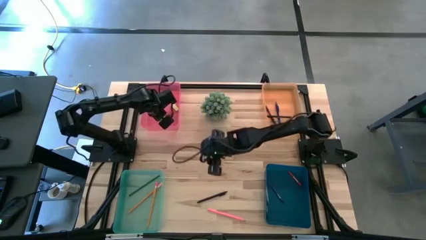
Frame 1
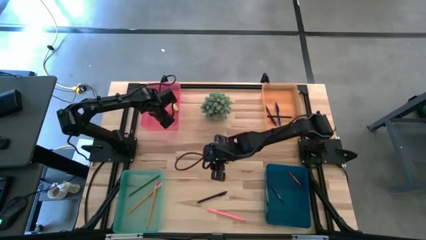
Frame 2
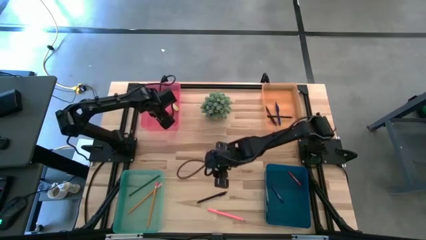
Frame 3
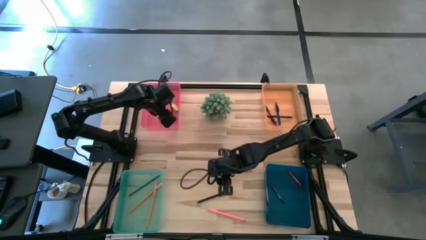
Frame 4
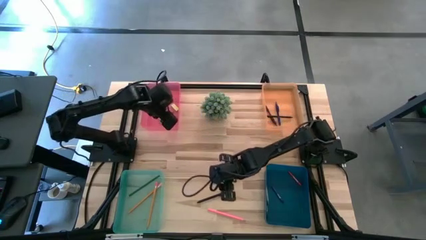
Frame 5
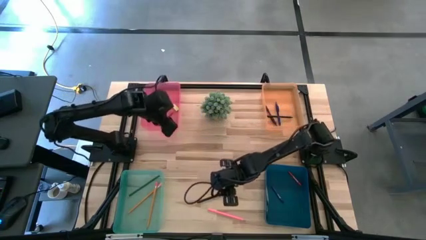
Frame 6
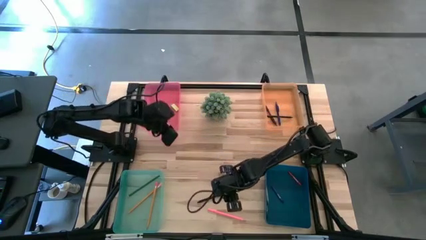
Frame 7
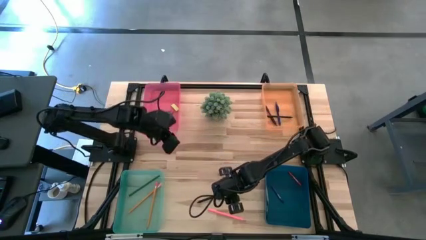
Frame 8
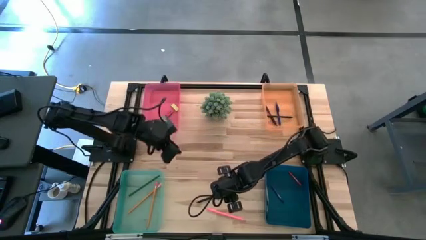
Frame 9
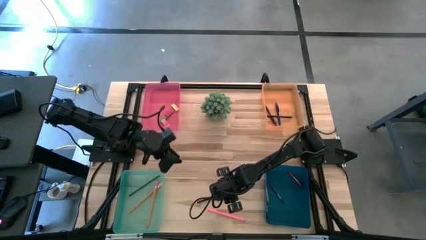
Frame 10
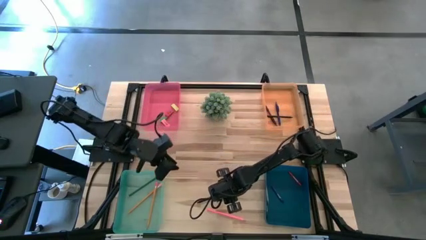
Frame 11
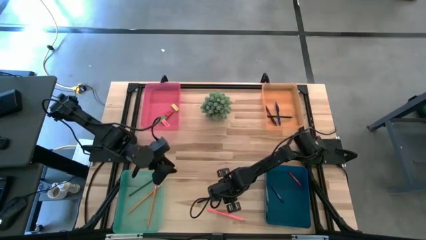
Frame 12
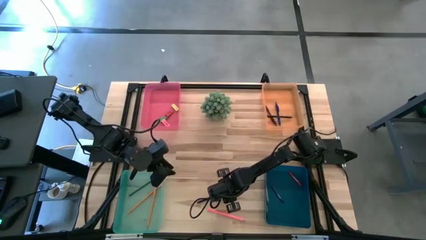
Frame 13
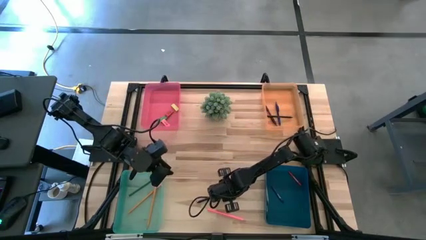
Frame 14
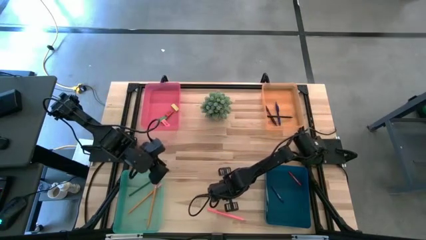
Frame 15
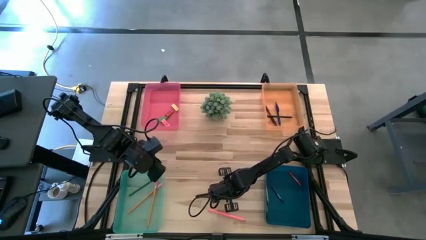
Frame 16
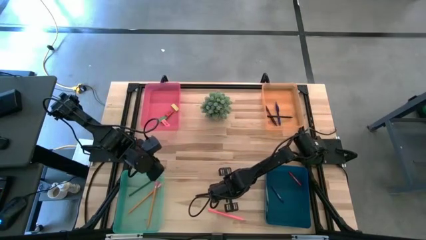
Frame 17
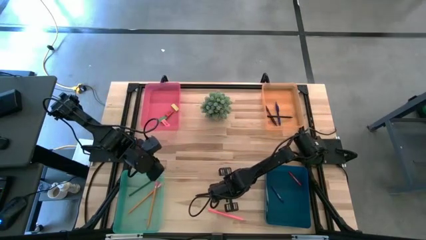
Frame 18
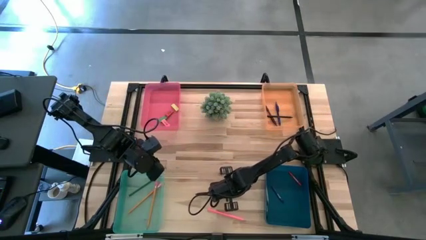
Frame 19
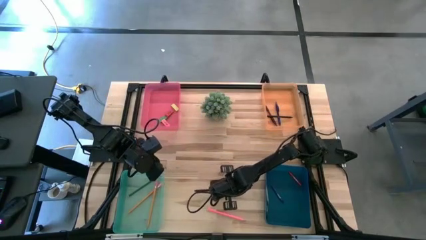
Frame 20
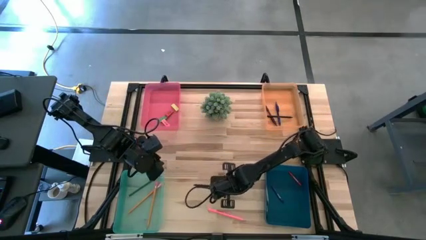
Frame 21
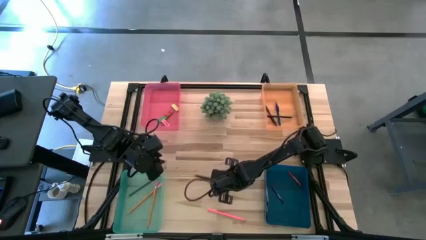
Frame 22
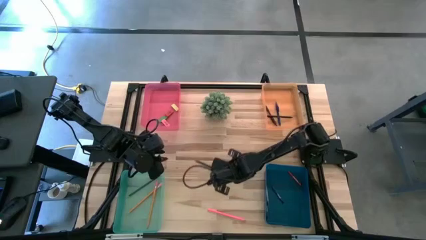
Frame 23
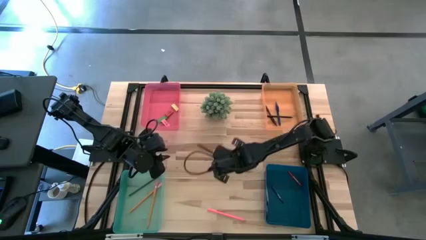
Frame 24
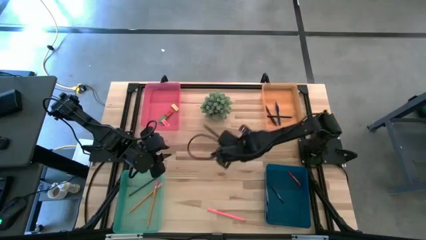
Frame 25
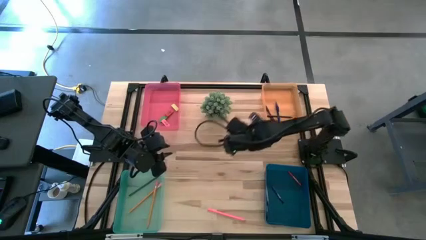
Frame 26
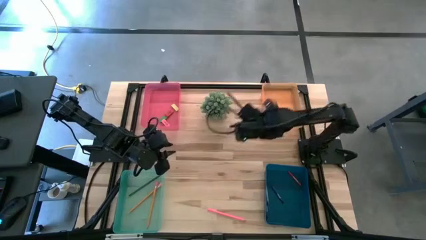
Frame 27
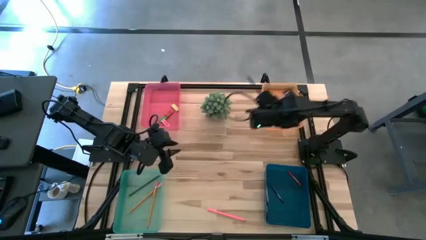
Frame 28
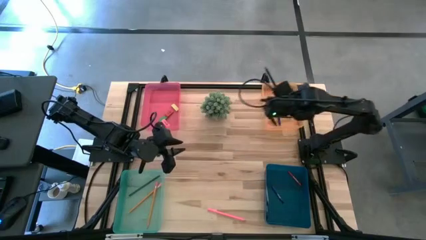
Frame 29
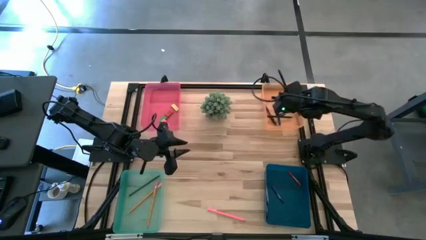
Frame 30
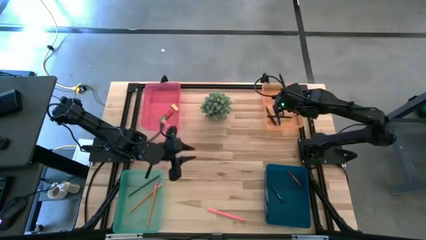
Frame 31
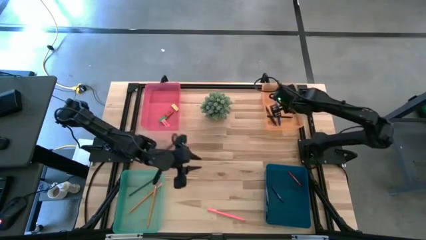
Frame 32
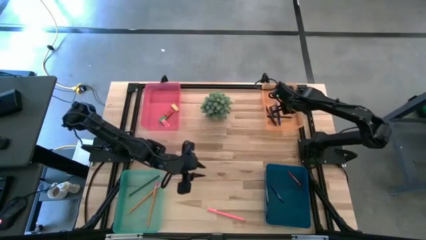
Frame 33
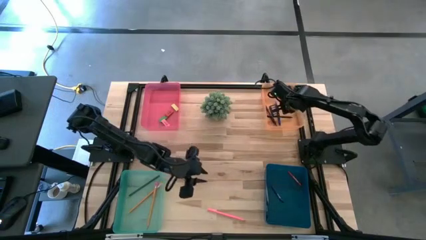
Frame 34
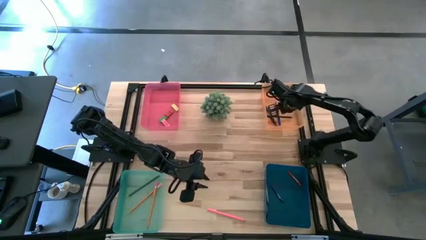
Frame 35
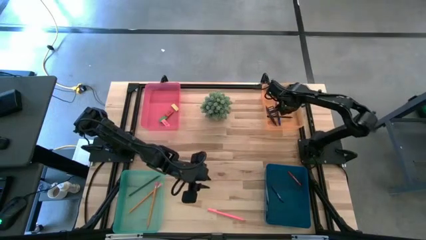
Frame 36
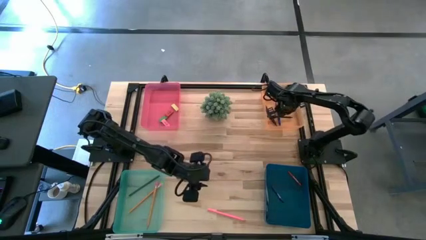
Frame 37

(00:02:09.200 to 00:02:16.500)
Task: Sort crayons/erasers/pens/pencils in bins
Put the black pen into the orange bin

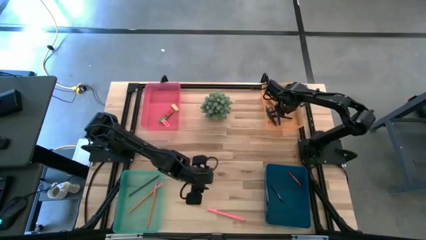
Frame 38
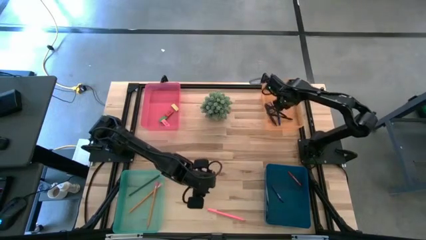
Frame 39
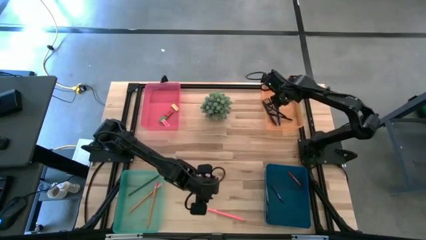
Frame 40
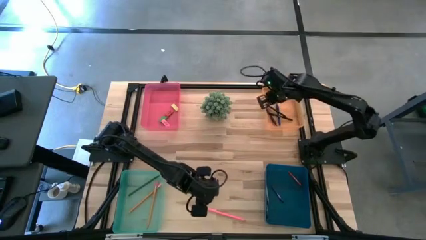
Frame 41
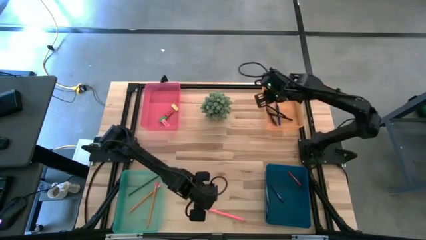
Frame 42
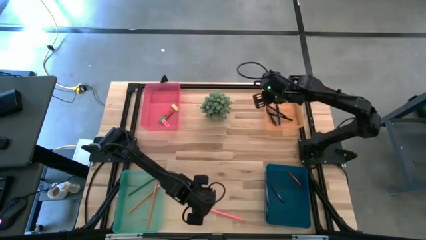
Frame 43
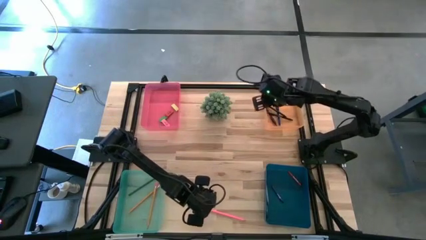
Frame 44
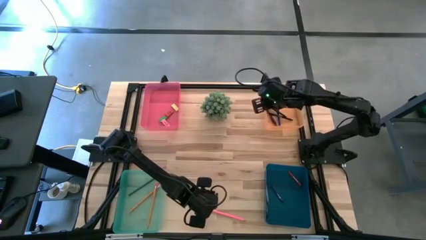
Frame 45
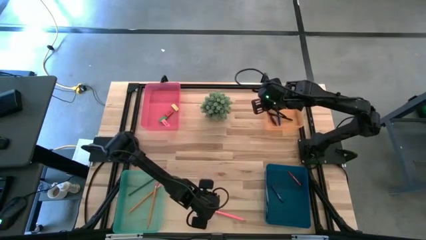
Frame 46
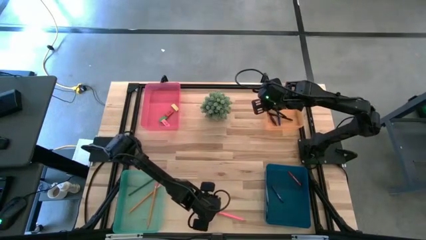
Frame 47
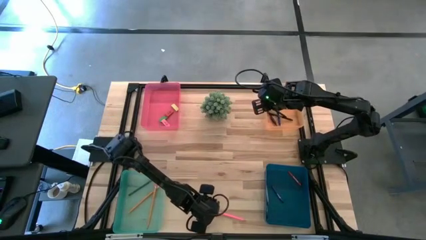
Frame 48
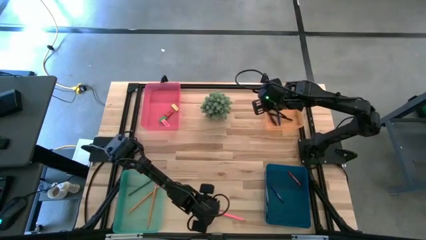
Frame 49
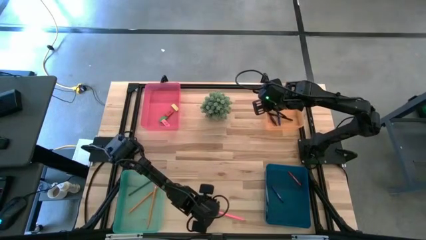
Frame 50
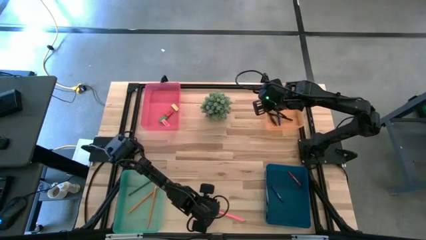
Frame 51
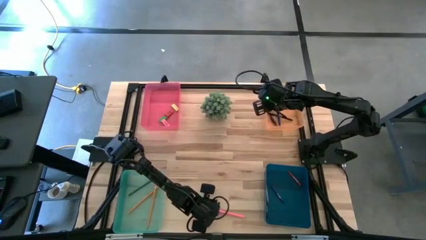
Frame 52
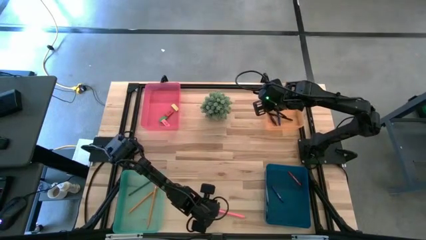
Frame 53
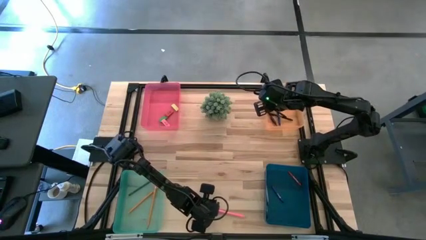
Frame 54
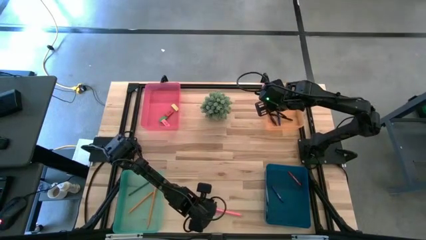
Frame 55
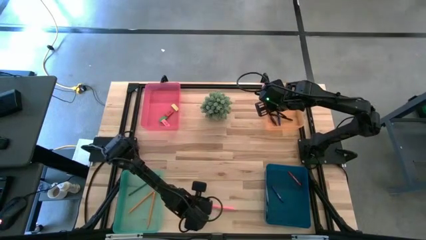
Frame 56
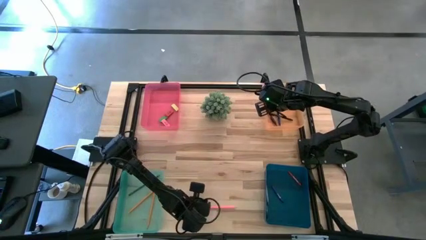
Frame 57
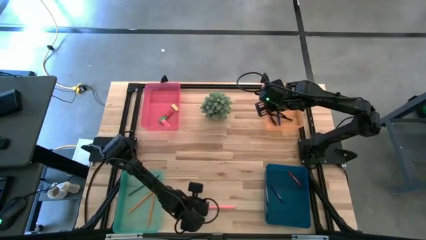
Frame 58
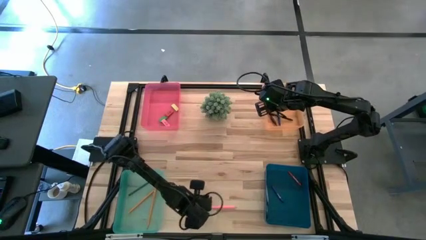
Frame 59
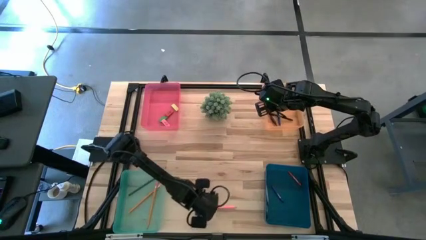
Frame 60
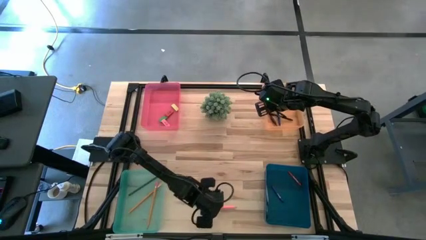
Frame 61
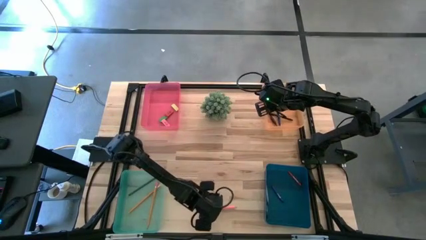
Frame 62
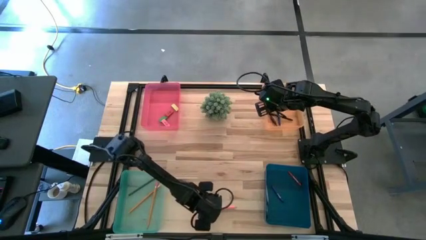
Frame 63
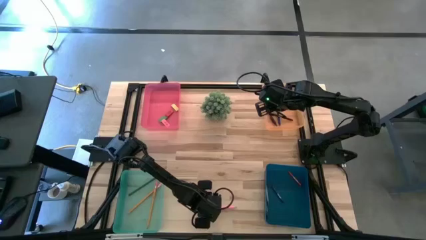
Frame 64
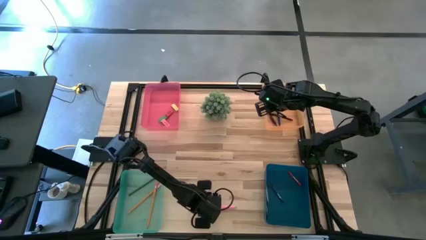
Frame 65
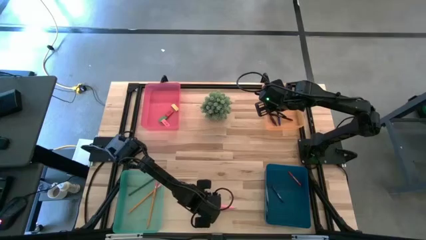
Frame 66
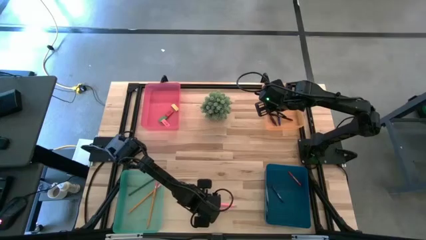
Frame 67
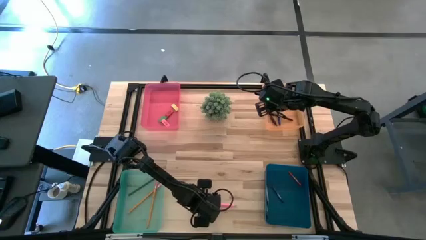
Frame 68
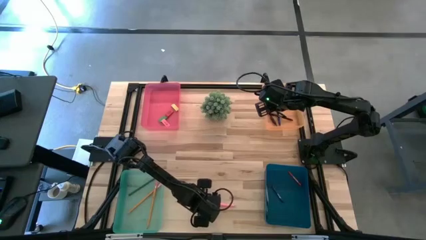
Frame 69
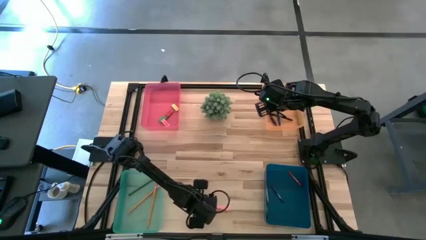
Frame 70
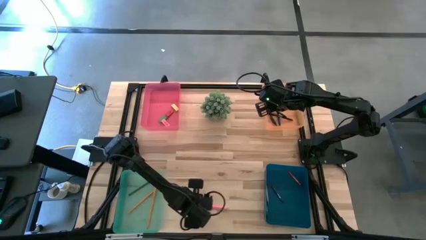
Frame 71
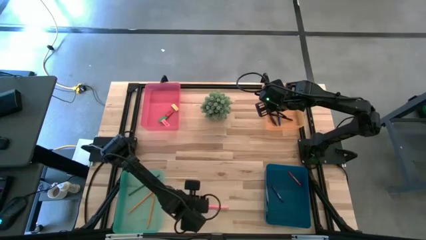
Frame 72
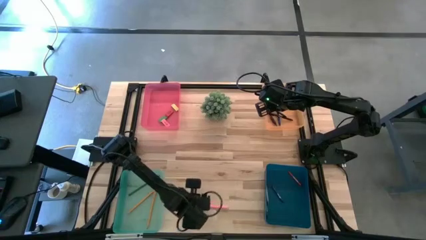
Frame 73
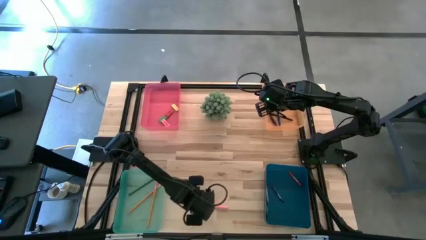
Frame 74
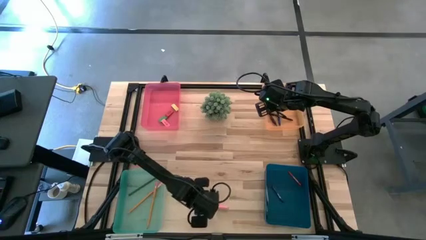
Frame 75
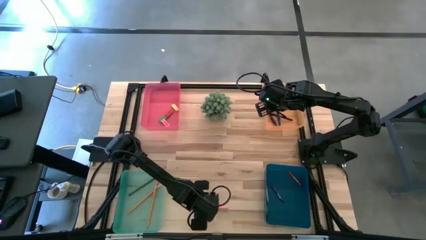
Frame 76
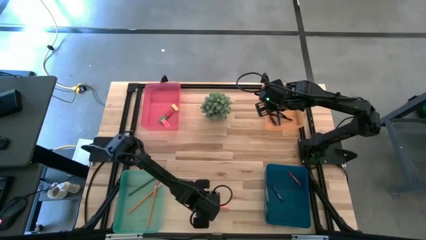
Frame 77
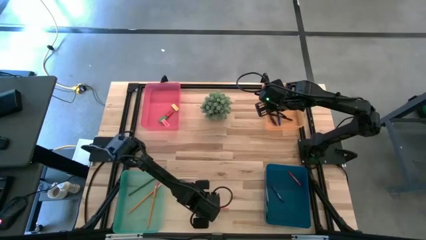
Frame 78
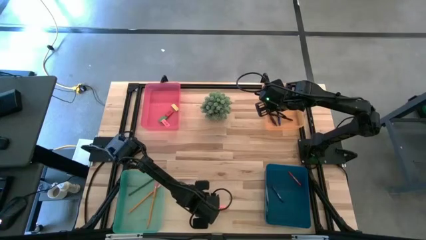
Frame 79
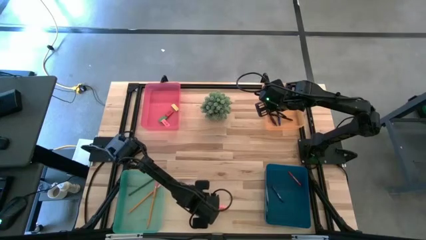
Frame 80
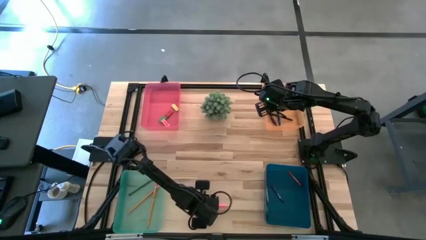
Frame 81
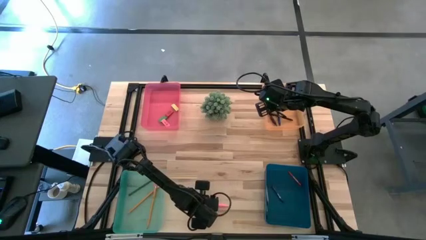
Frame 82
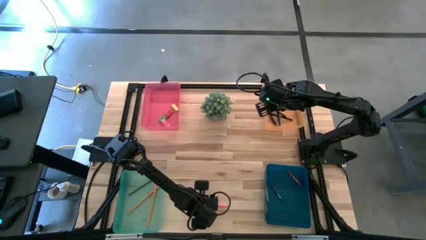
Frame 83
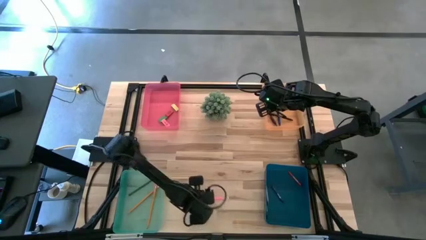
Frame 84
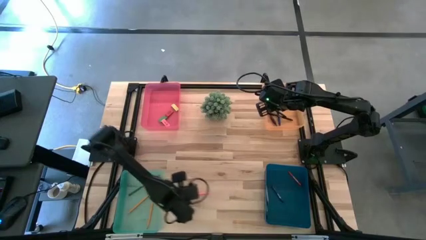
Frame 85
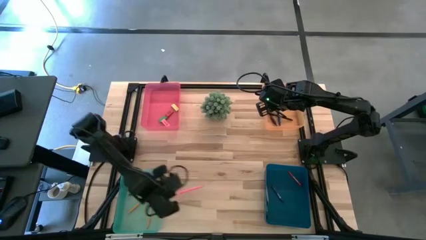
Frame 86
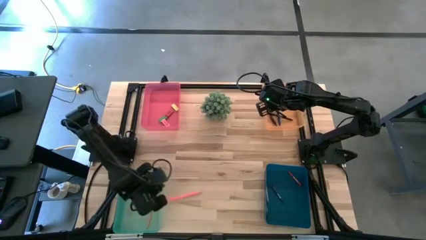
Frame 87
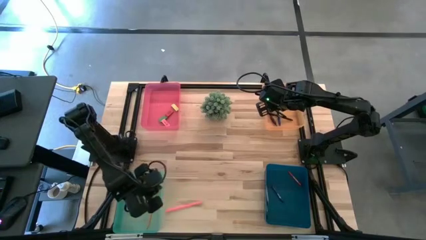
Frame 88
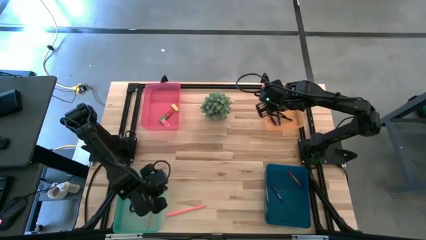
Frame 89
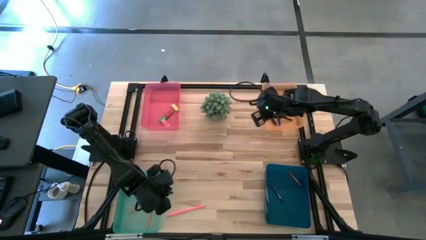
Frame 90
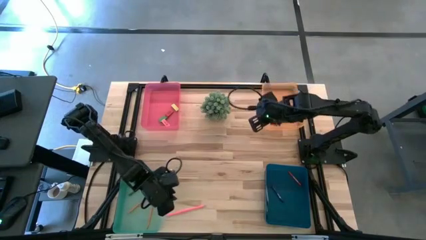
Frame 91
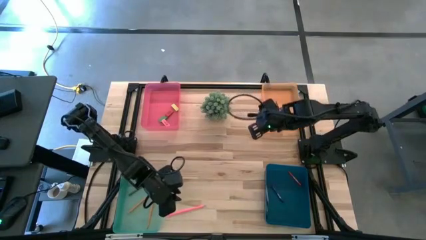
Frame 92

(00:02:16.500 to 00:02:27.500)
Put the pink pencil into the green bin
